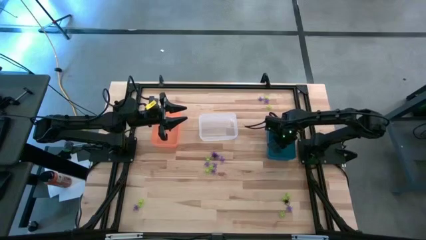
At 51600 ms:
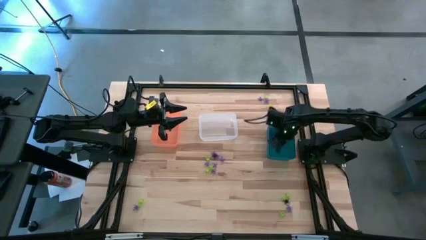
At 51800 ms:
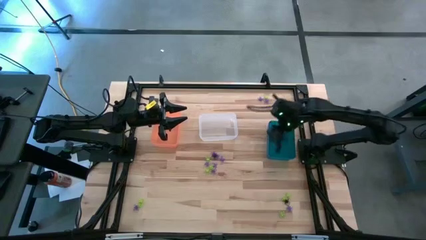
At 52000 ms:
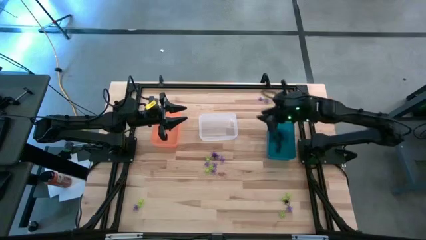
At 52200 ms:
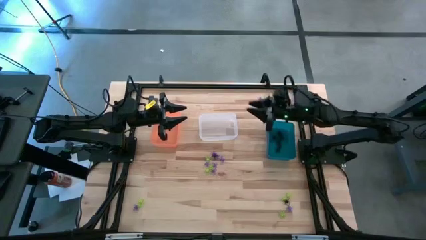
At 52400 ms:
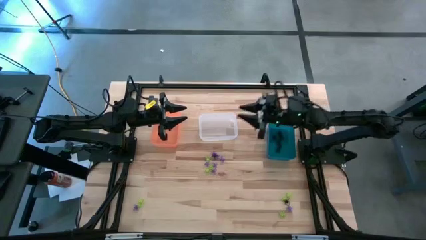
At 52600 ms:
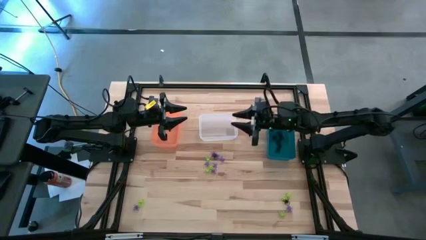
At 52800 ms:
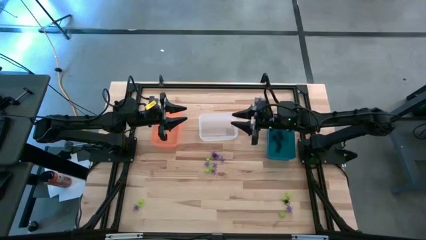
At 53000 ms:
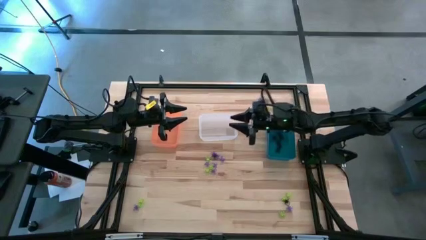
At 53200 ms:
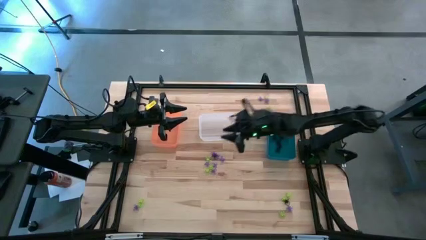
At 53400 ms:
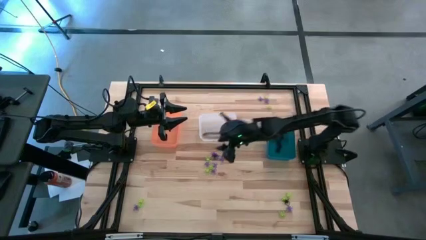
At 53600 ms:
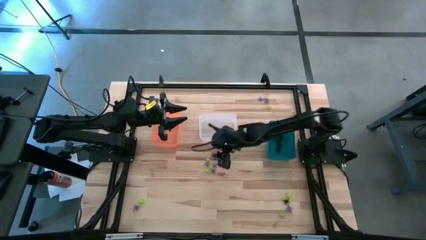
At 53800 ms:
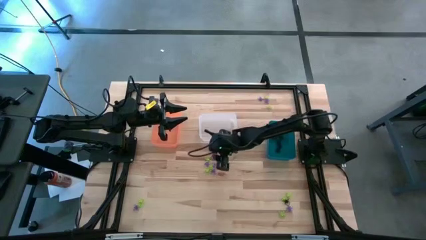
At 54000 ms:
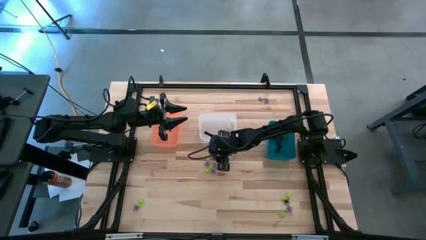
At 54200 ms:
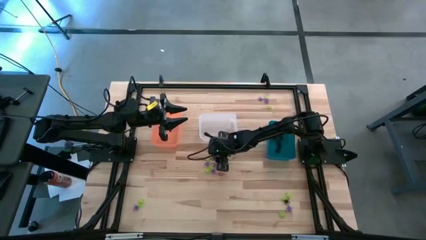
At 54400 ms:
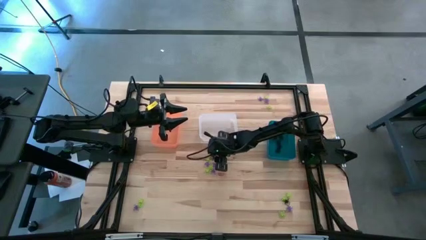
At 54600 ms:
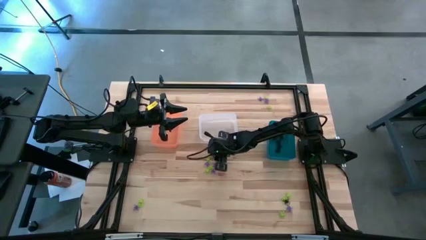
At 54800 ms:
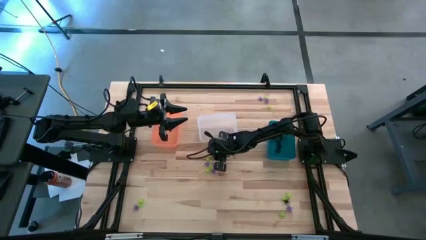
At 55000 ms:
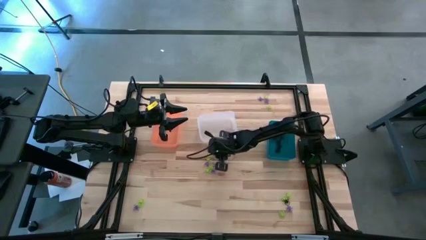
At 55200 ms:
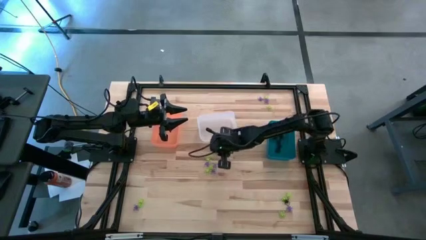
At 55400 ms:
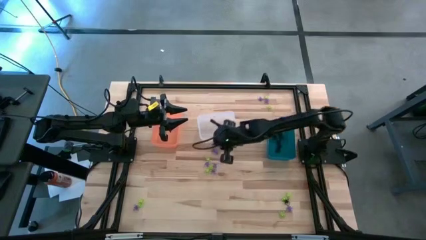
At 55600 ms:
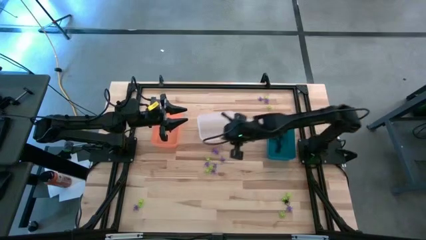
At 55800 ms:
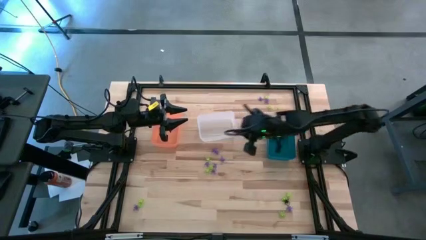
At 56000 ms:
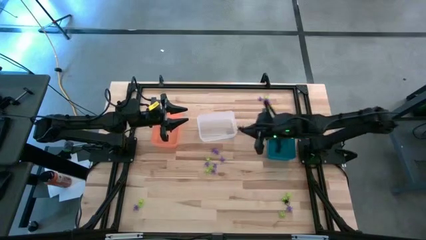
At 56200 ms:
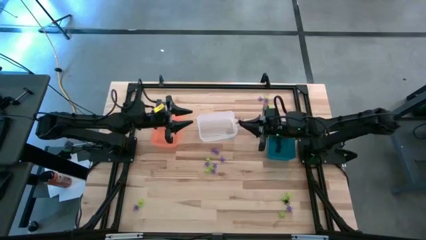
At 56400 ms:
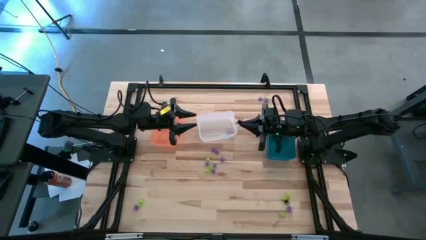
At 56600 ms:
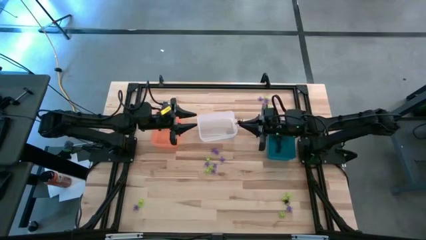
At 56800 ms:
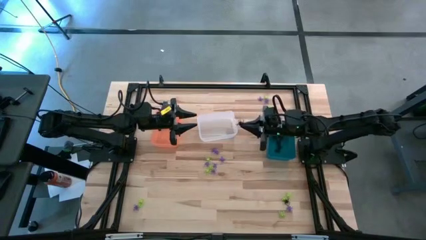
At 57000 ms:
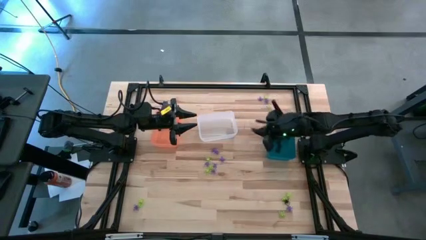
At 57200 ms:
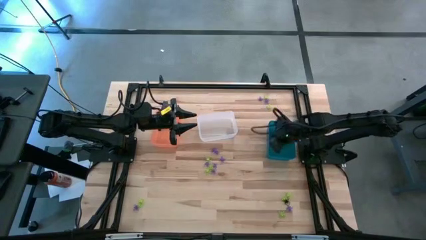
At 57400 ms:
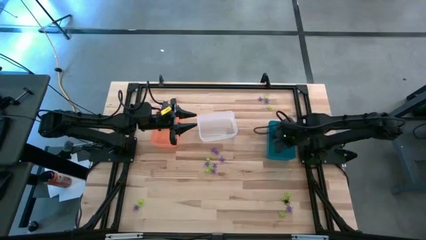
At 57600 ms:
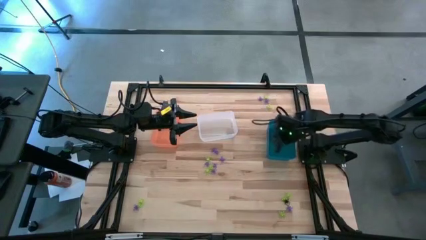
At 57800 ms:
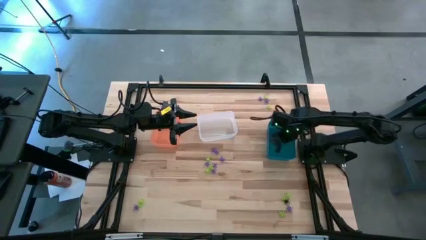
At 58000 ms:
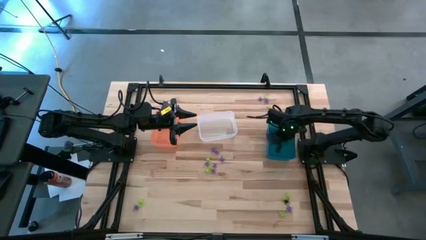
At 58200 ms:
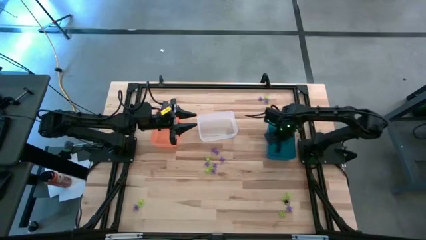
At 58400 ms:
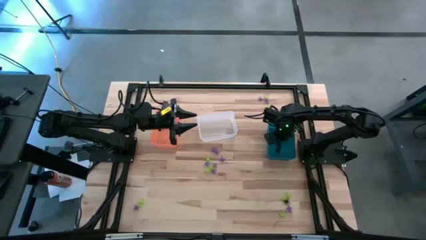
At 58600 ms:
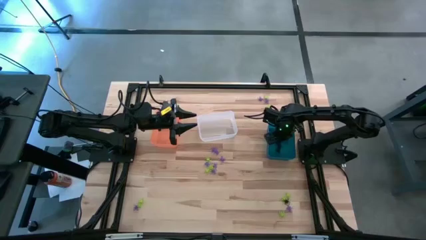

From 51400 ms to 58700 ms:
Task: Sort Halloween decoration
Put the black spider toy into the blue bin

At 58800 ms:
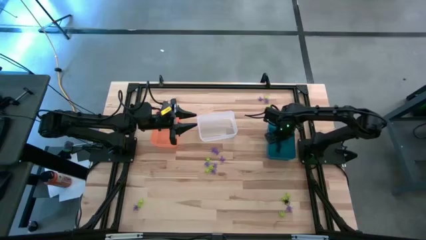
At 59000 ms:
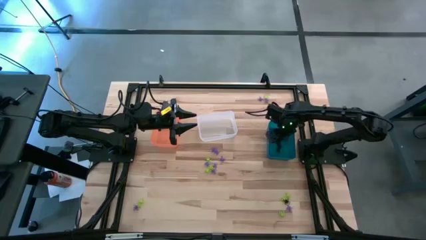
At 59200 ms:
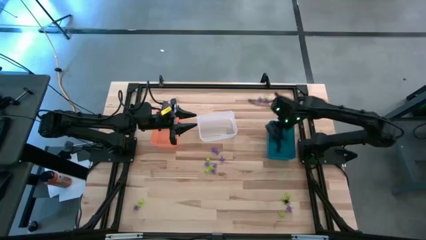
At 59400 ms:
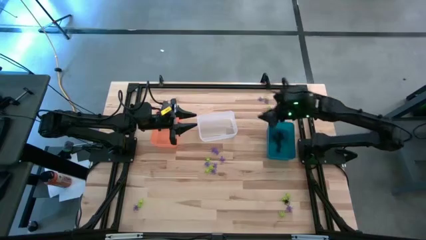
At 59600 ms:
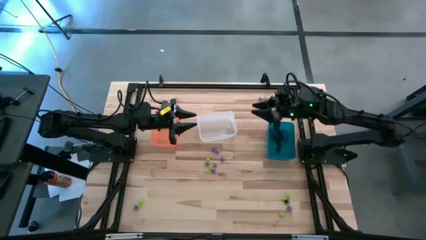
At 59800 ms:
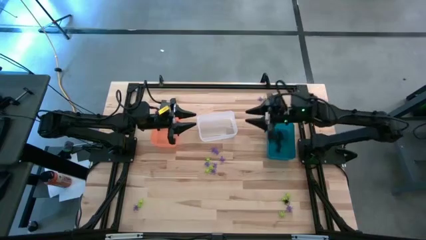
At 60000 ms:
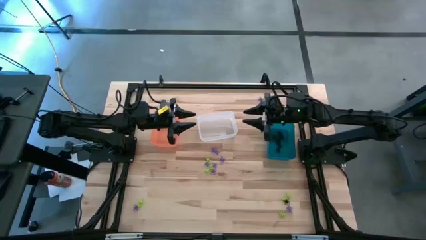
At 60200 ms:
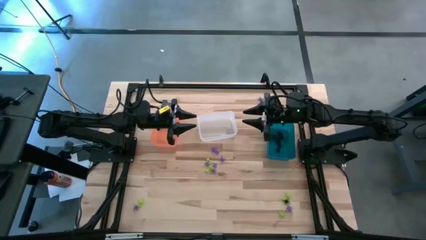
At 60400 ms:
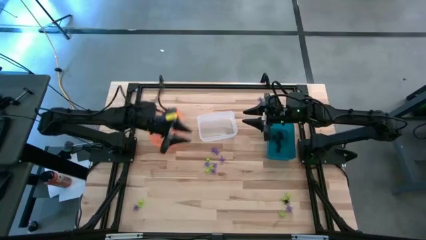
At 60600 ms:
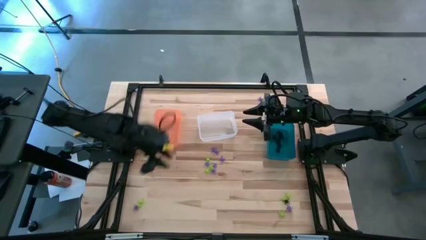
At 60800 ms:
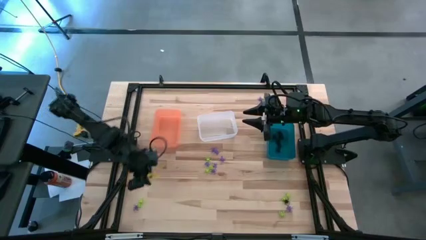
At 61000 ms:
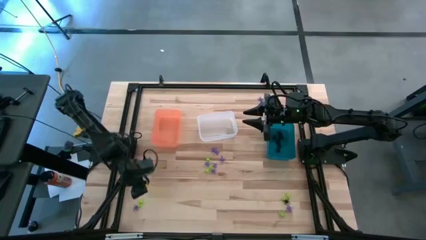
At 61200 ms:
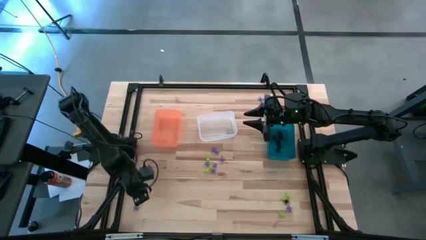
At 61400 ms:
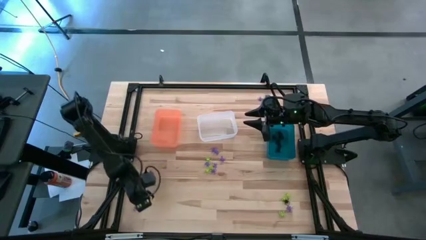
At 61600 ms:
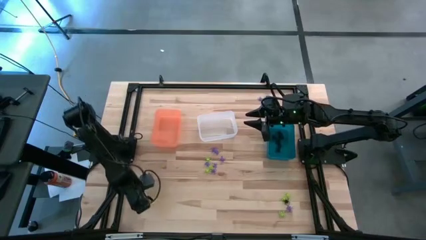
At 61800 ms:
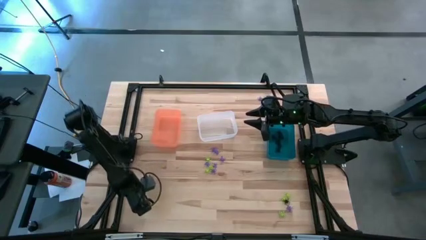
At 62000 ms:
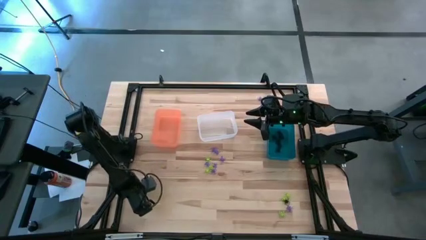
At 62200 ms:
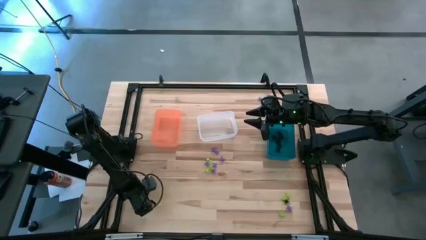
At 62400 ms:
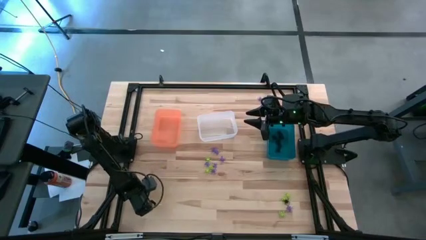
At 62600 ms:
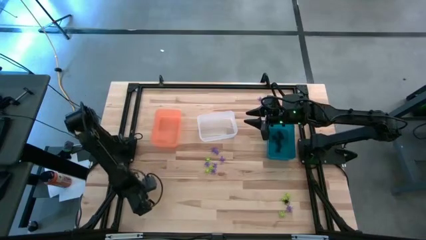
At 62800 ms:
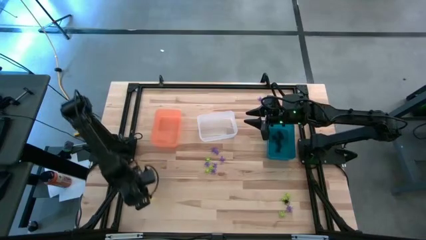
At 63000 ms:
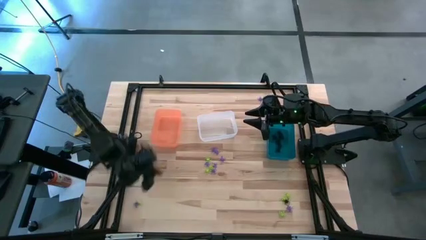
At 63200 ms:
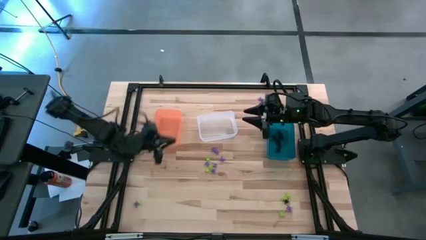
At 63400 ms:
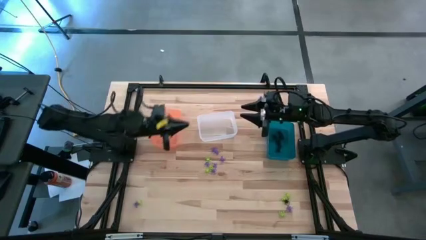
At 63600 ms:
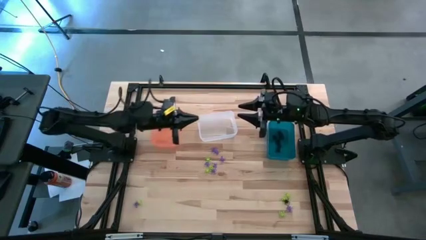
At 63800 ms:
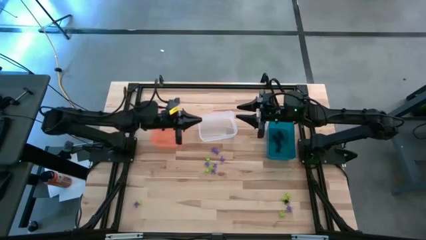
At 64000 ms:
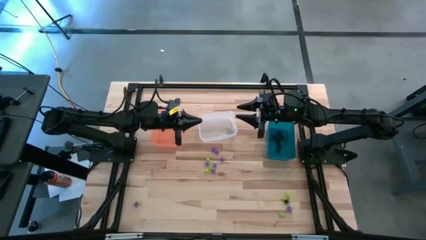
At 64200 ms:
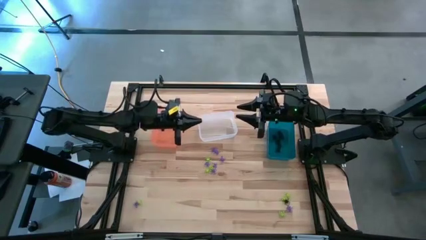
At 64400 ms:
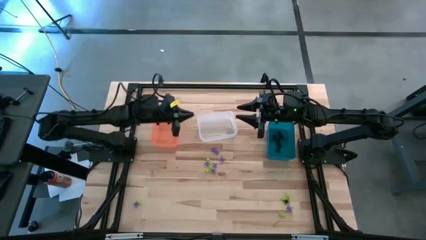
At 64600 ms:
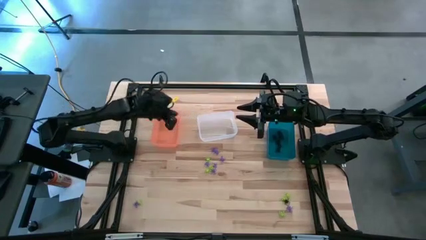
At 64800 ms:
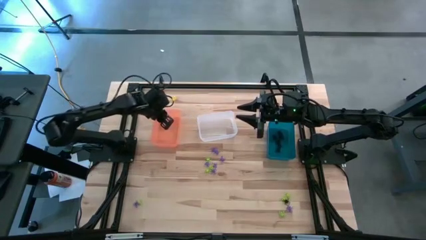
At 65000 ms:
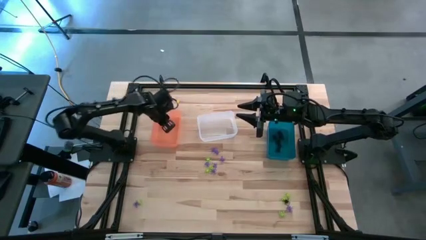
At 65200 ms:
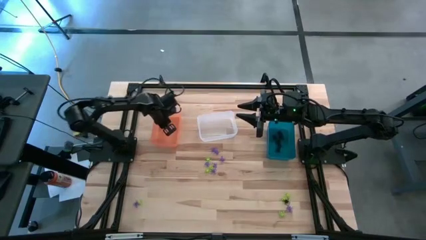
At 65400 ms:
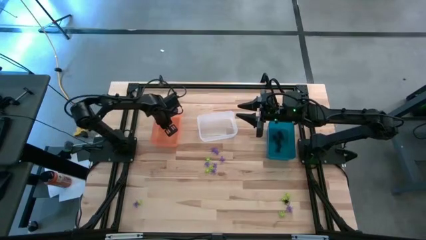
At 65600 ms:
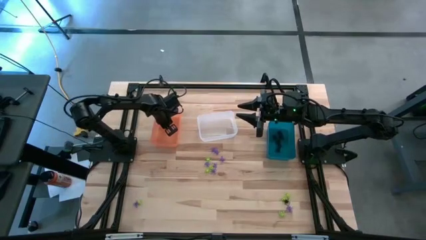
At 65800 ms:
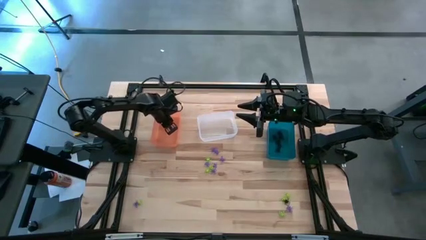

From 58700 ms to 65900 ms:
Put the green spider toy into the orange bin

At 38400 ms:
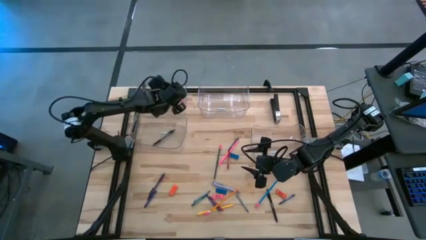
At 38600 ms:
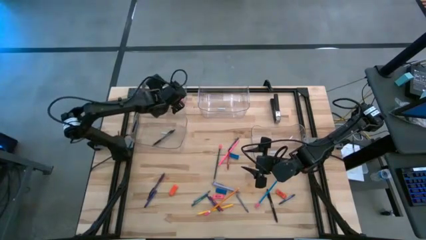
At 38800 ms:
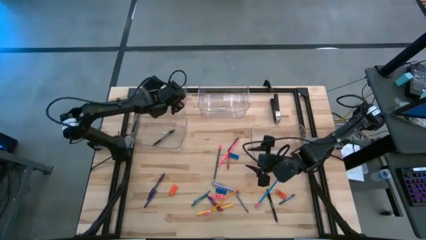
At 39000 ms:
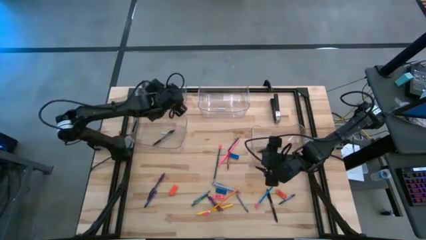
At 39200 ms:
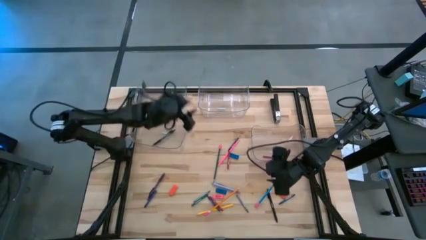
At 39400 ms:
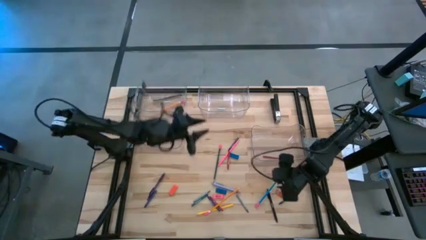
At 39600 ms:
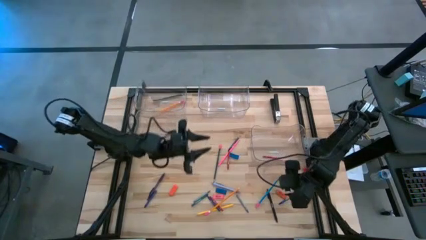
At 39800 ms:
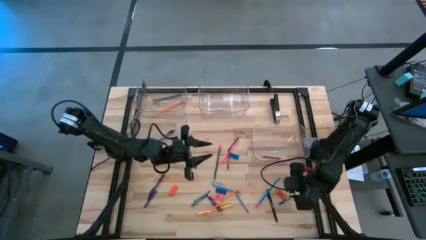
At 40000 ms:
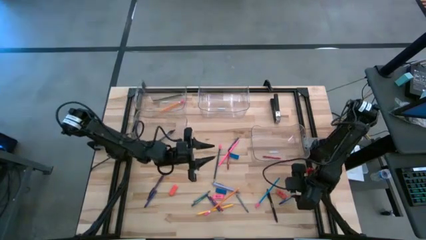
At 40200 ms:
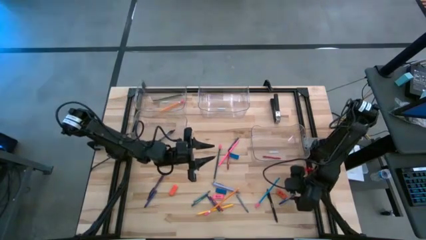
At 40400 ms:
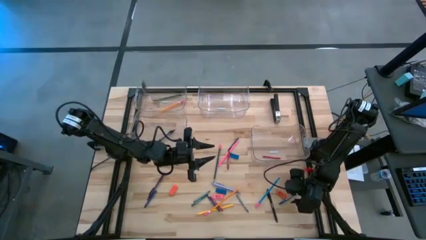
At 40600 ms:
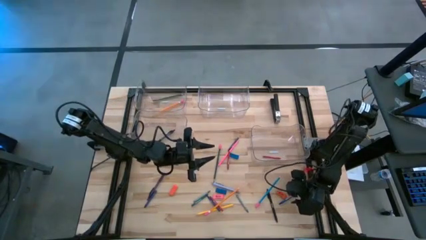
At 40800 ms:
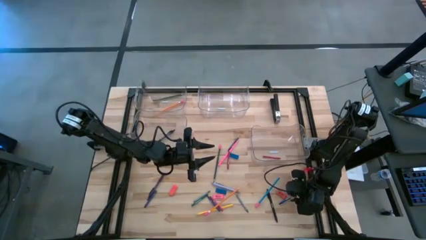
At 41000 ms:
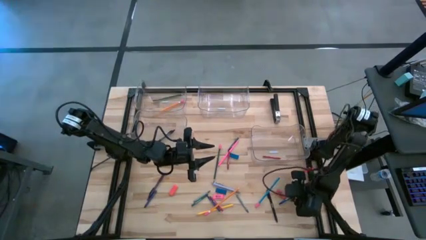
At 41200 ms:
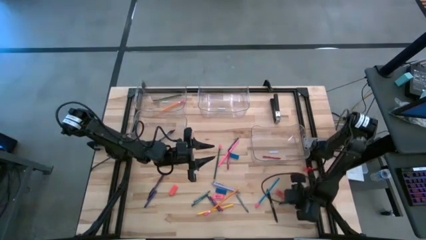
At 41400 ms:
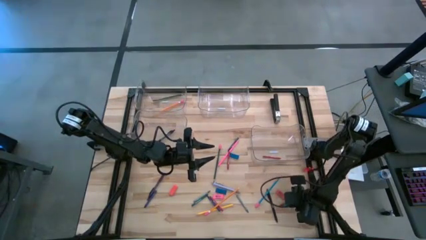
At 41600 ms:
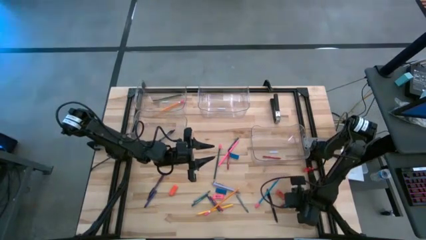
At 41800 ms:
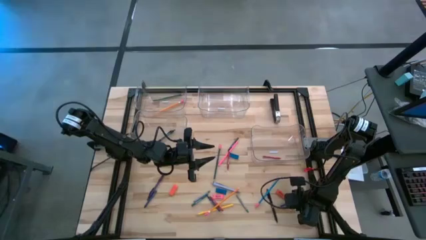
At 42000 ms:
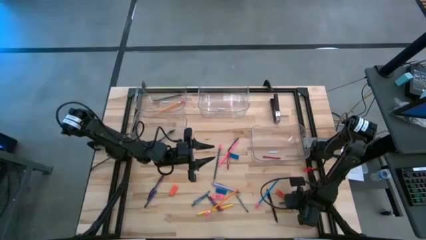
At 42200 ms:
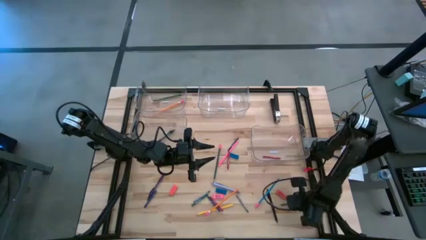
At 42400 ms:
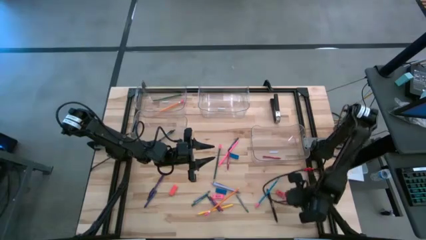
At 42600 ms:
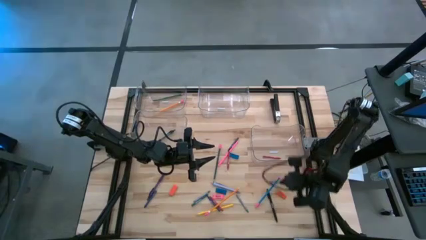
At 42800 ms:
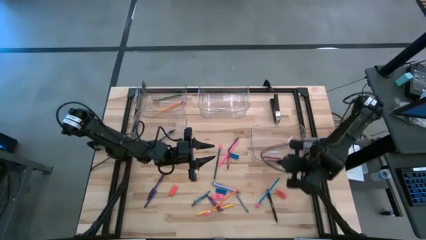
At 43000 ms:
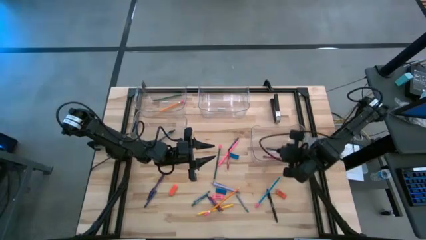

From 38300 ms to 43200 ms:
Task: Sort crayons/erasers/pens/pencils in bins
Put the blue crayon into the bottom right transparent bin
